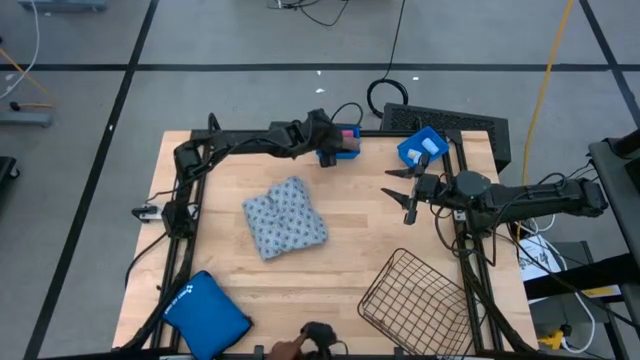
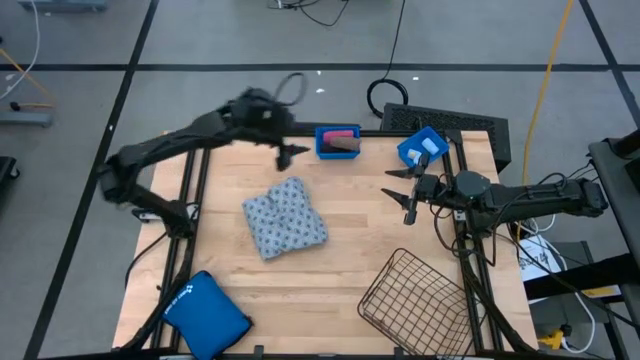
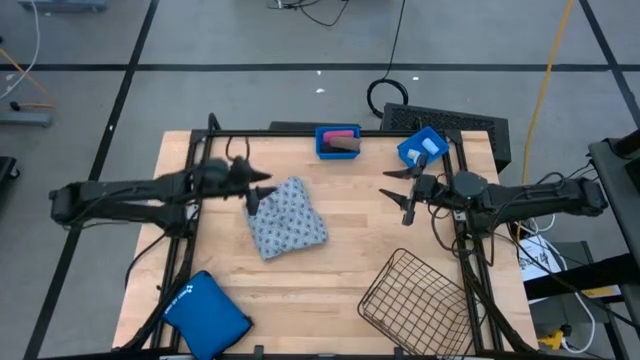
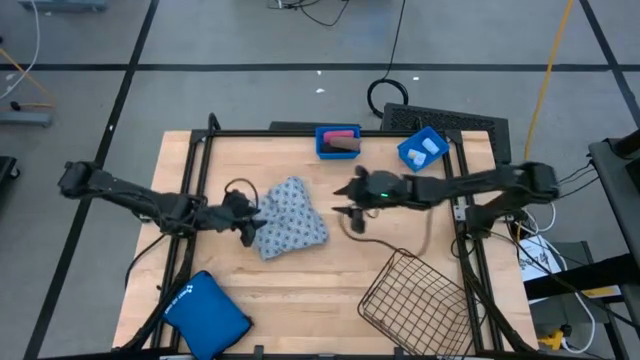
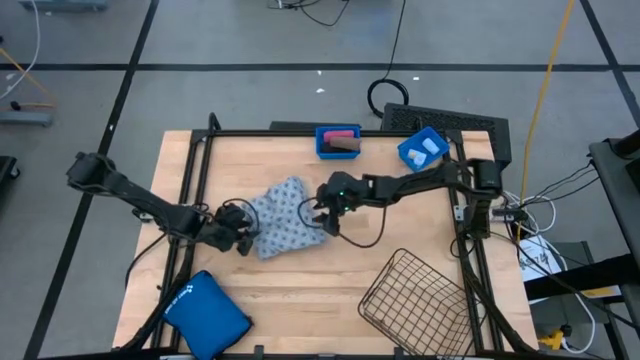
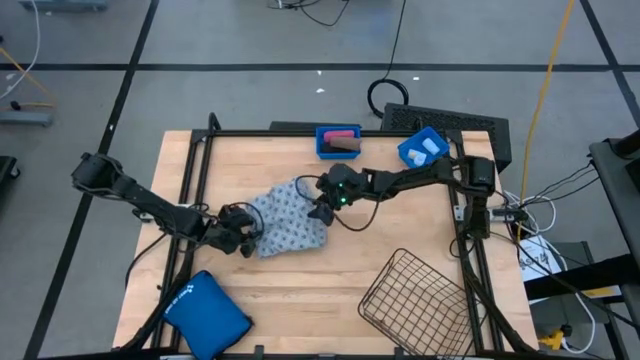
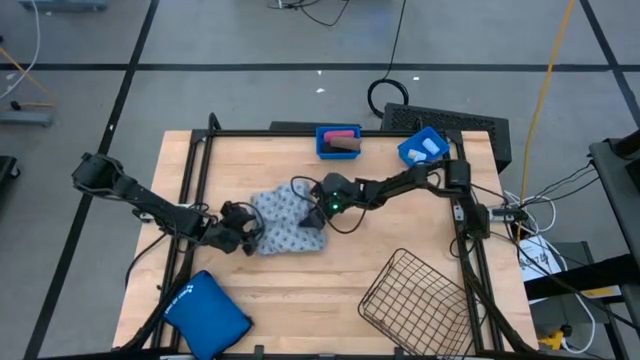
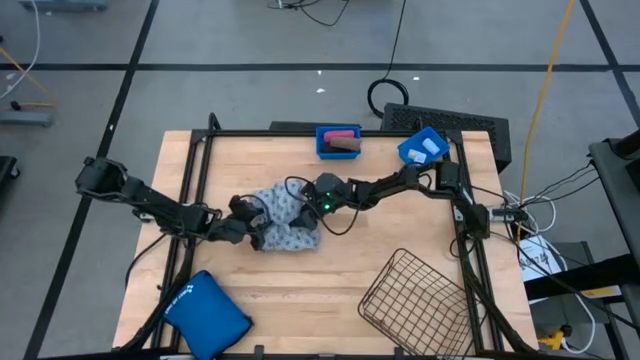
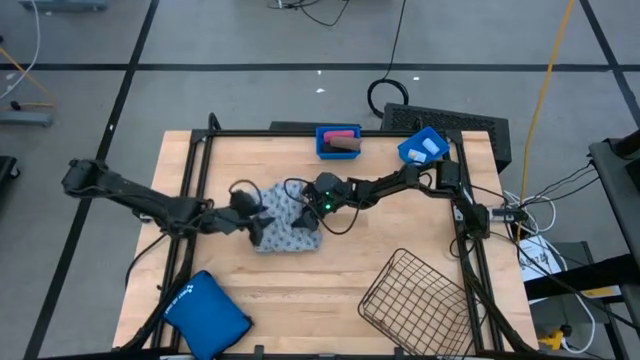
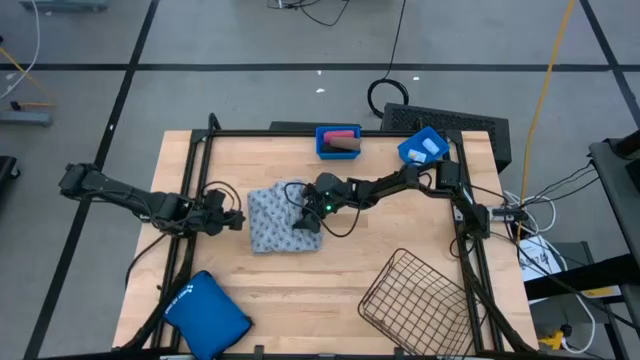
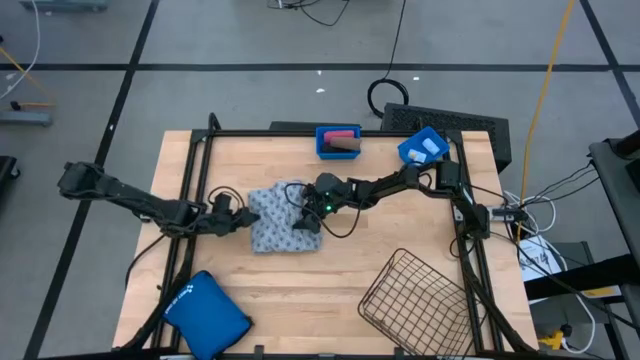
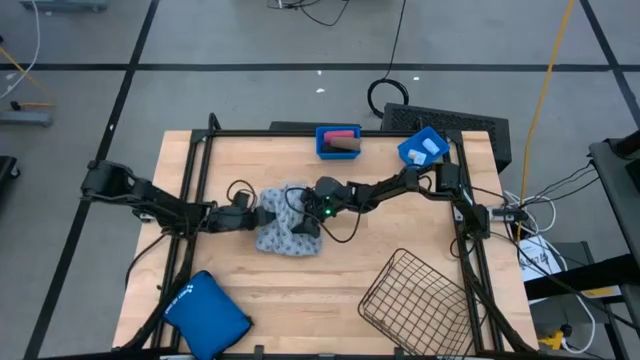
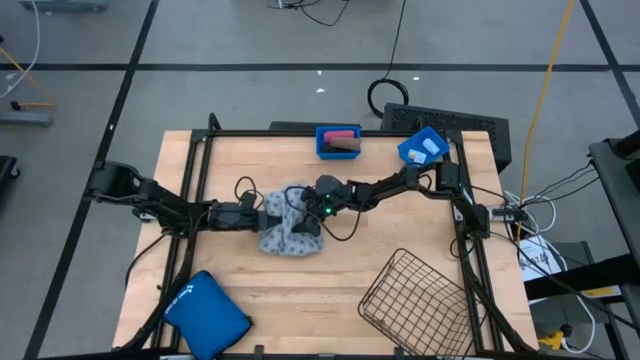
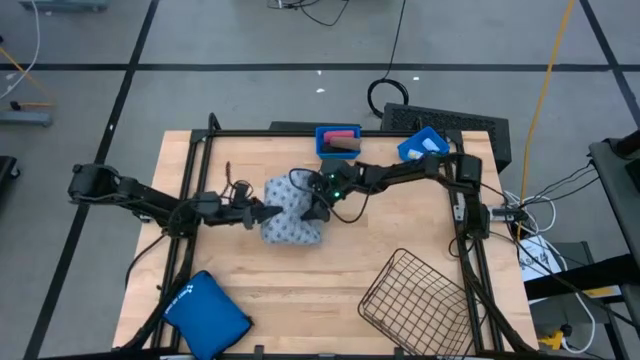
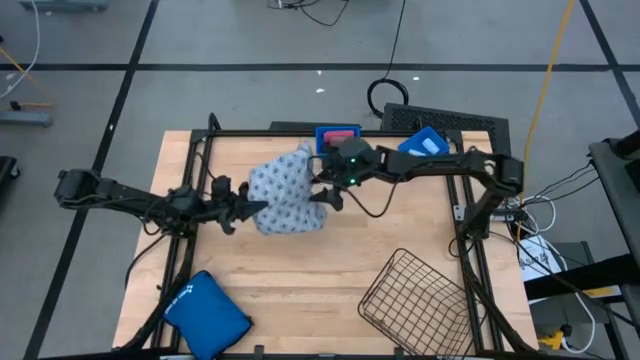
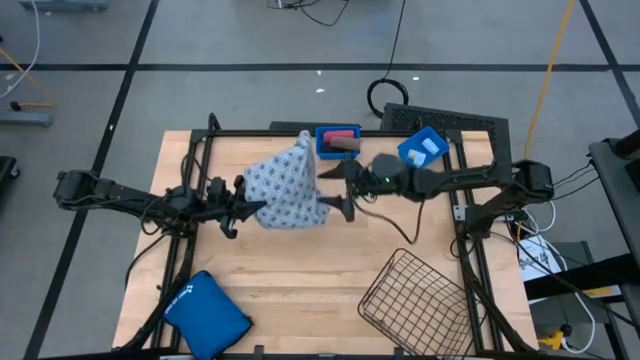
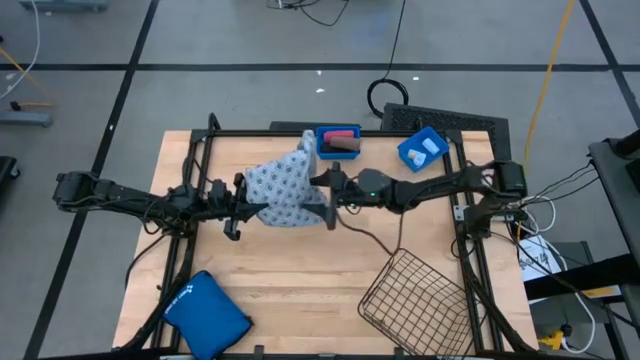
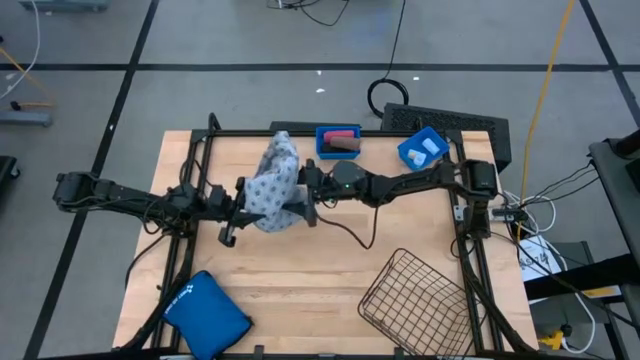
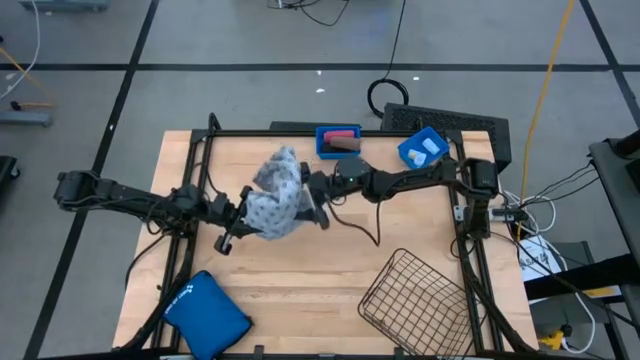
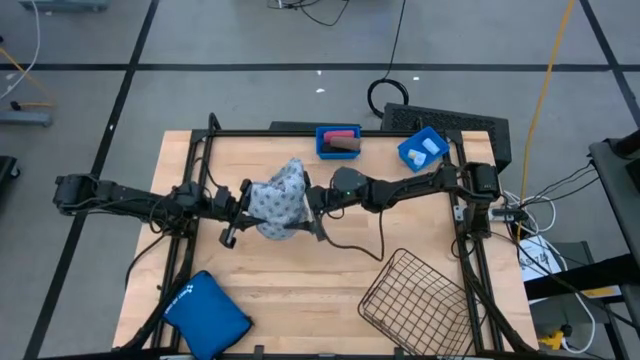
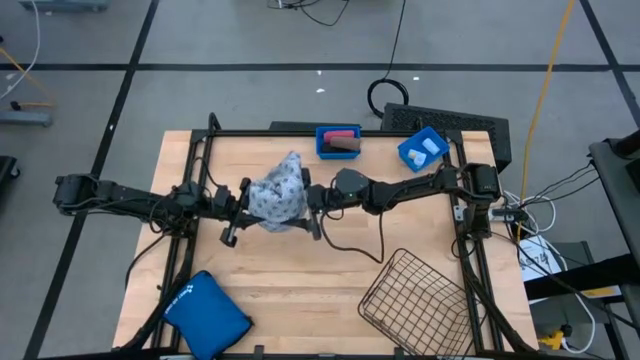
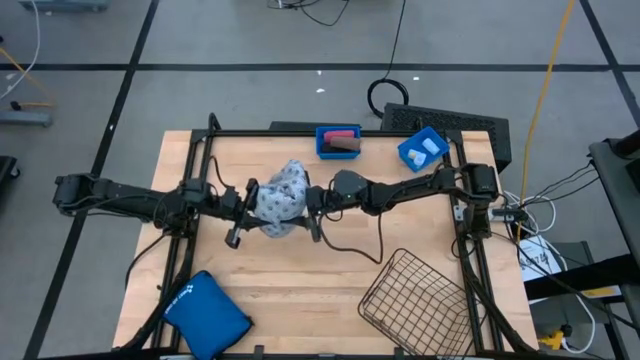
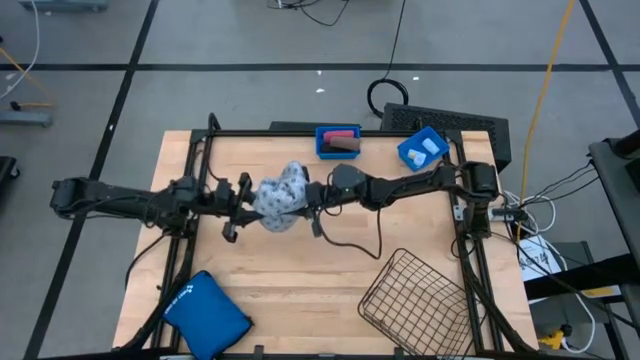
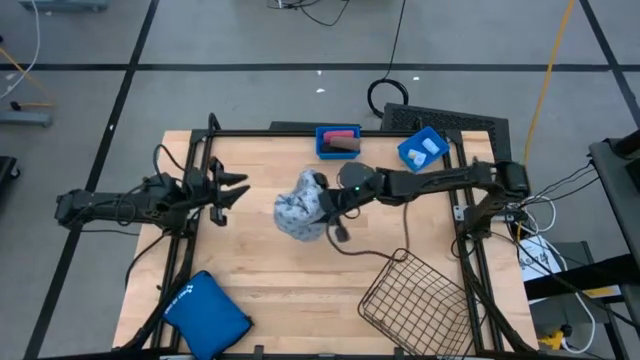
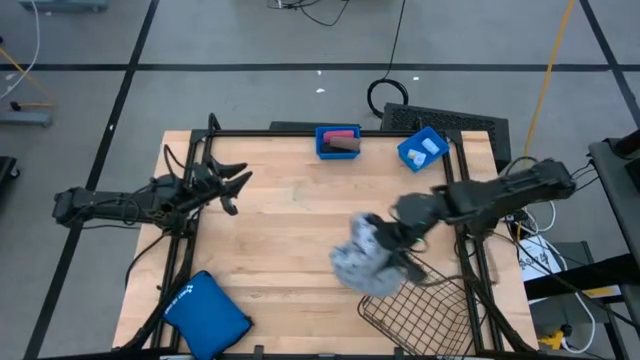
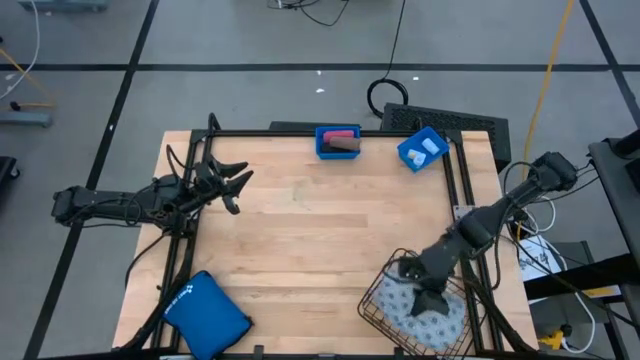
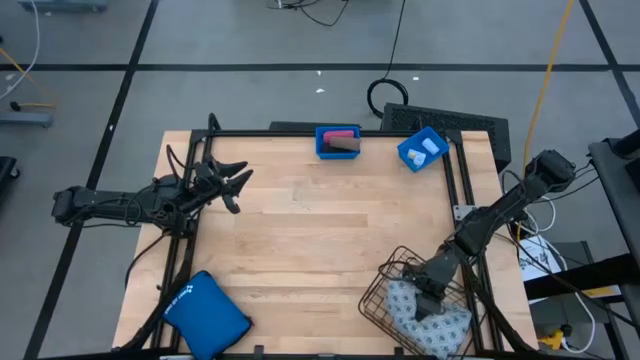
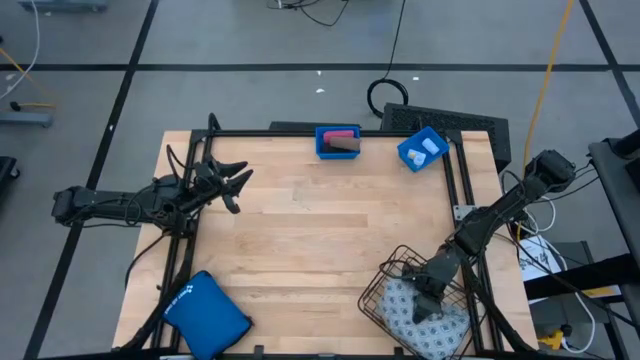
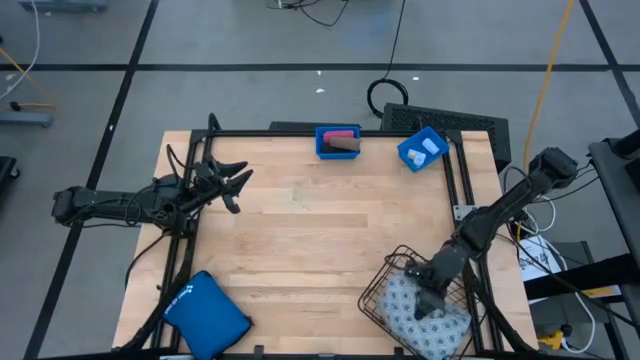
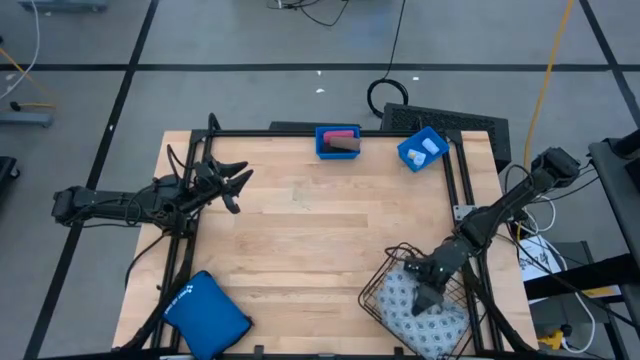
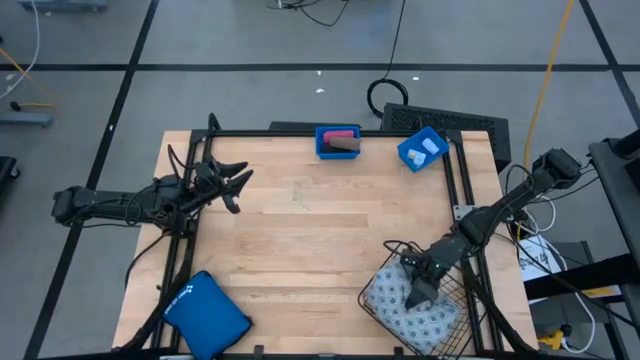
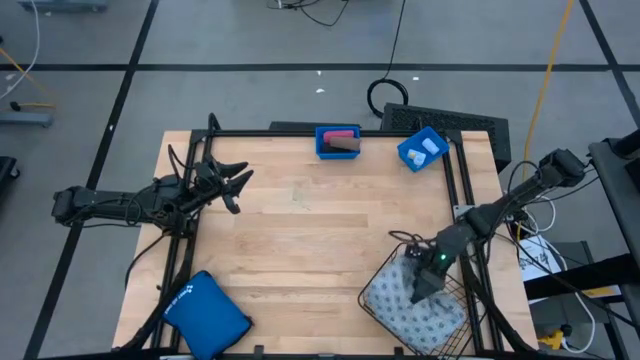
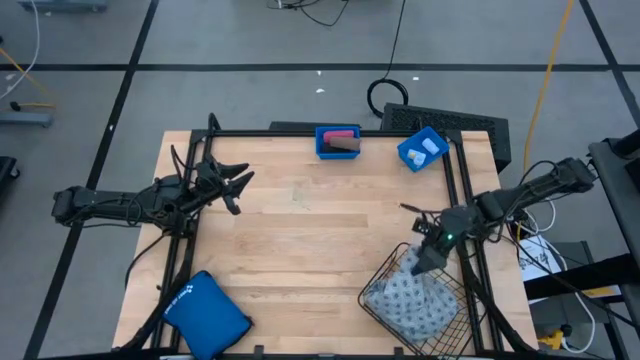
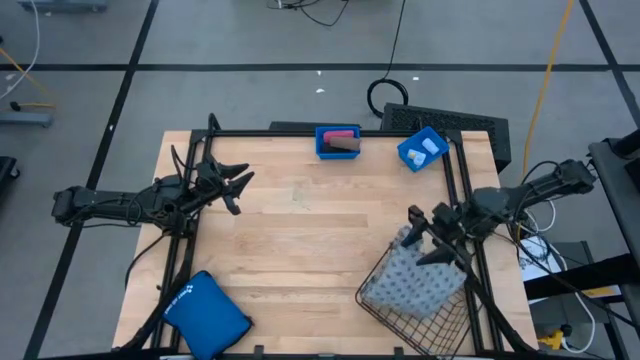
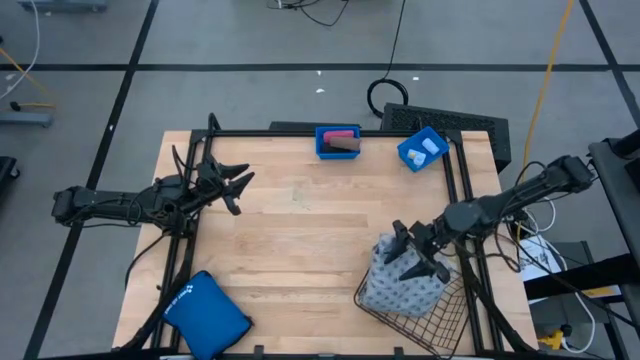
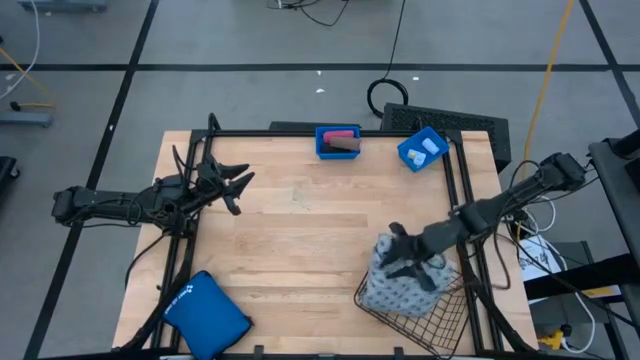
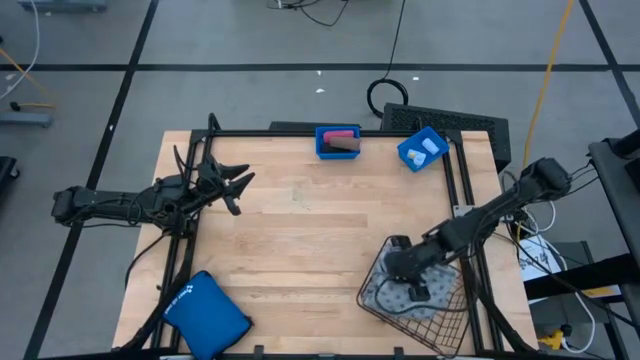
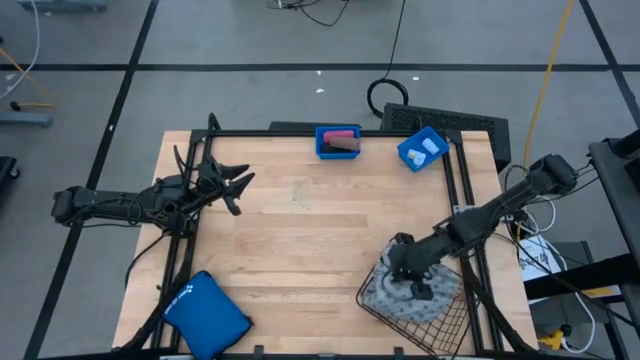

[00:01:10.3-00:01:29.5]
Task: Pick & Place Medicine items
Put the blue patterned patient gown into the wire basket

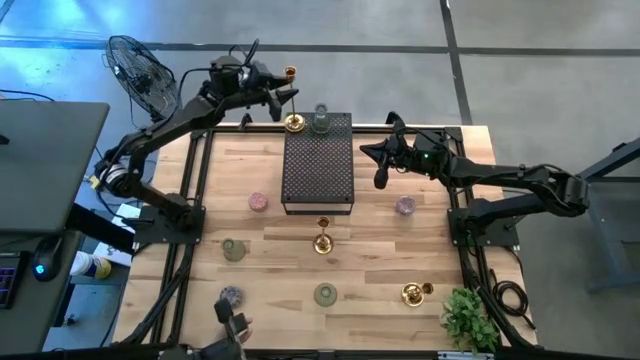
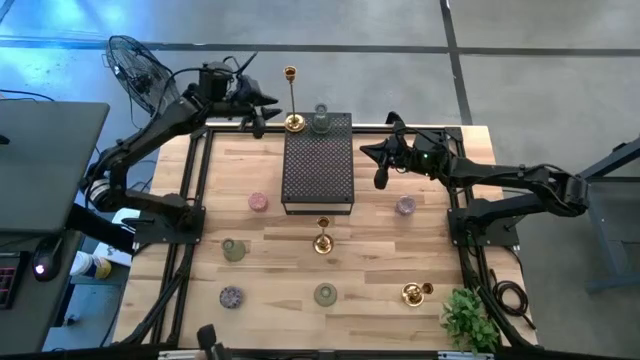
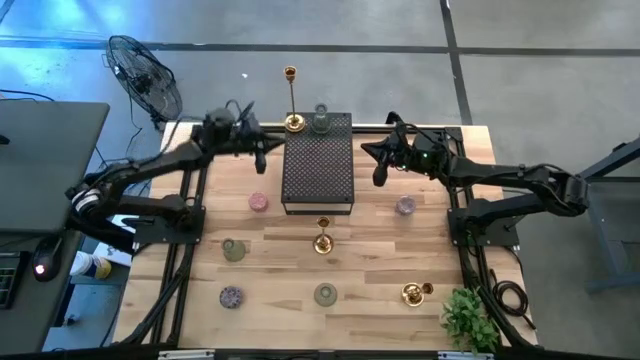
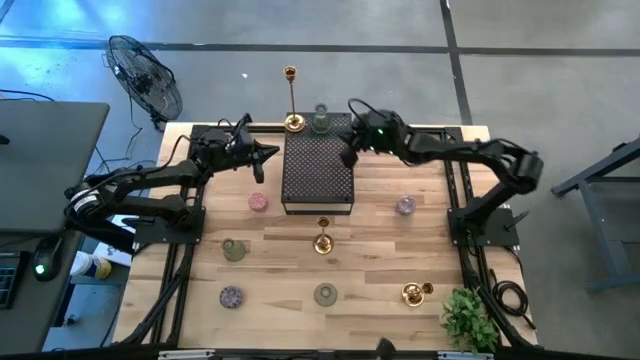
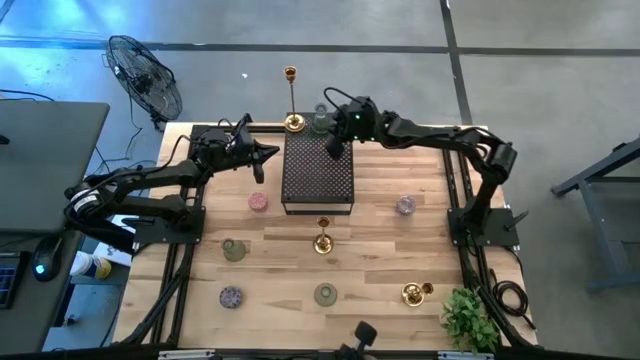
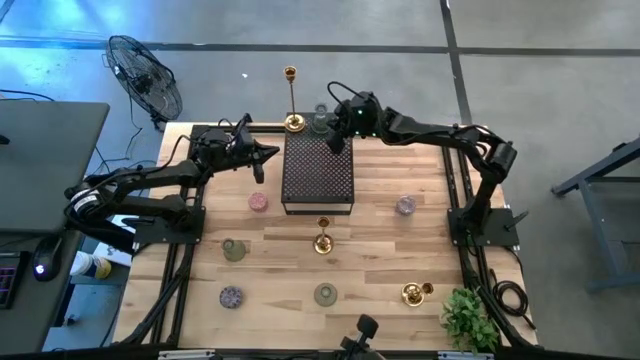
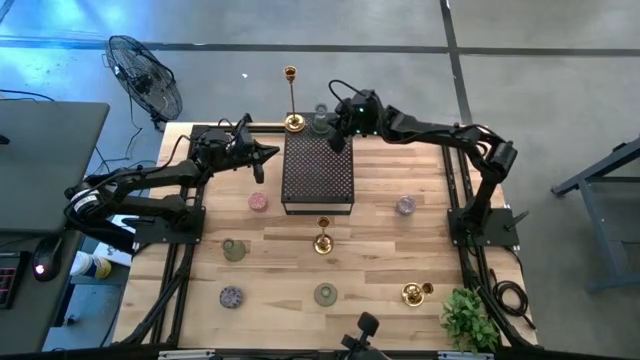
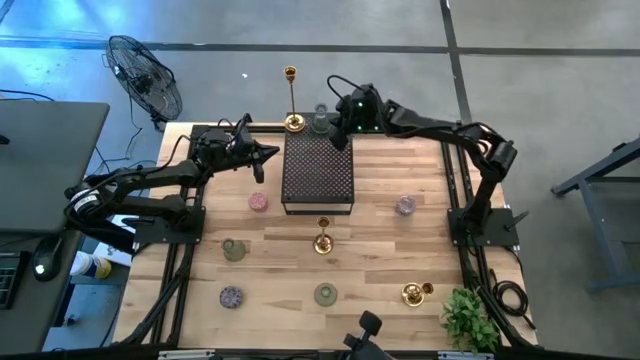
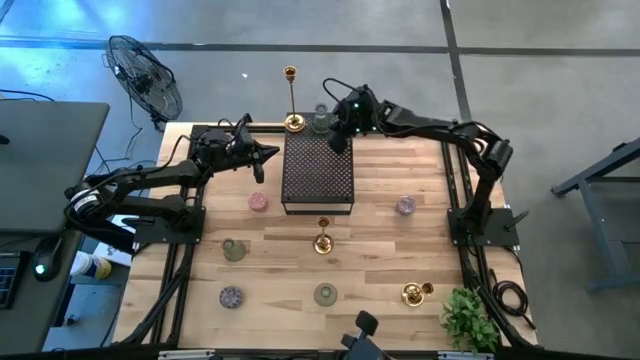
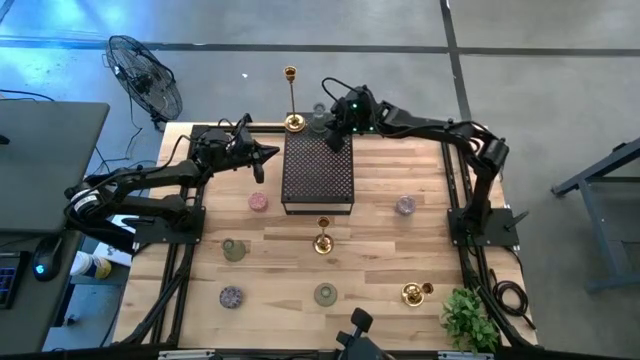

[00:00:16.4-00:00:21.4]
Task: Pick & Place candle stick holders
Adjust the green candle holder on the shelf
